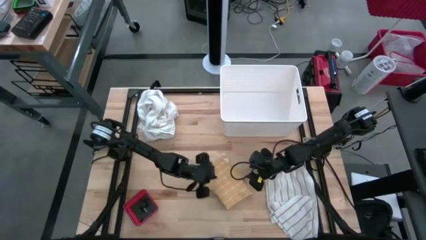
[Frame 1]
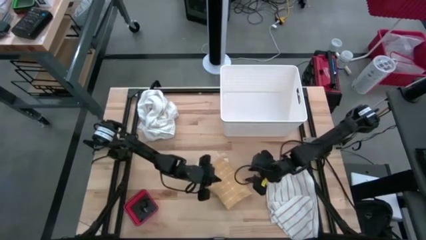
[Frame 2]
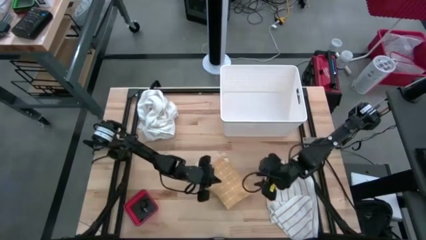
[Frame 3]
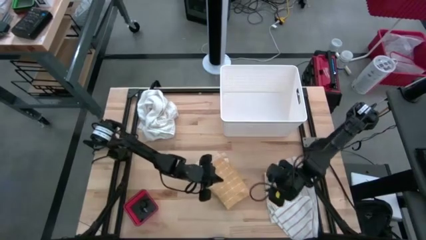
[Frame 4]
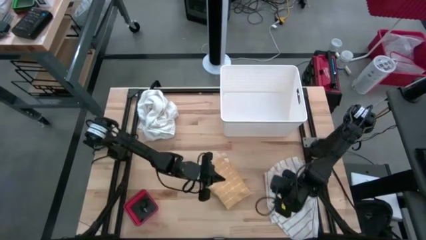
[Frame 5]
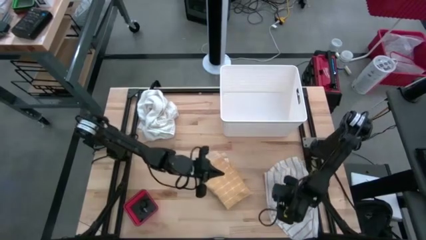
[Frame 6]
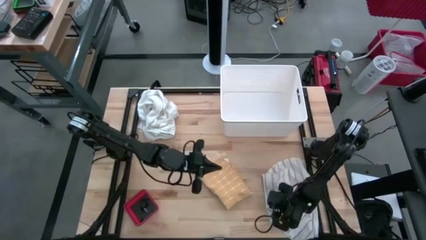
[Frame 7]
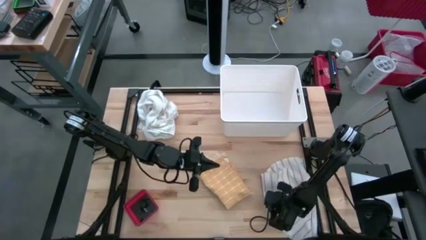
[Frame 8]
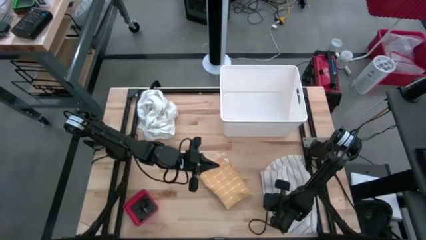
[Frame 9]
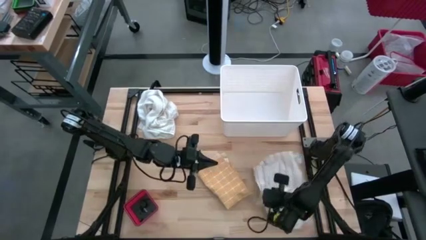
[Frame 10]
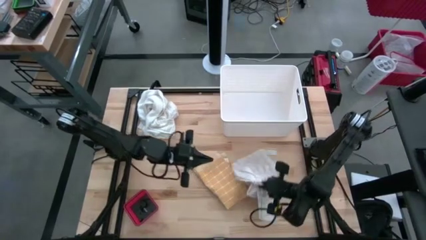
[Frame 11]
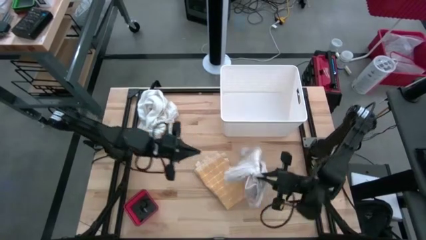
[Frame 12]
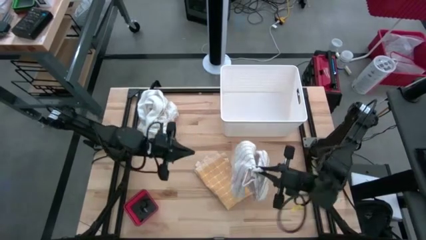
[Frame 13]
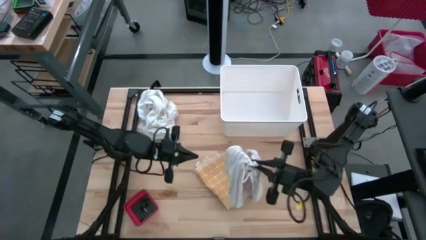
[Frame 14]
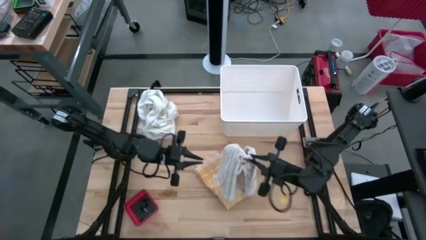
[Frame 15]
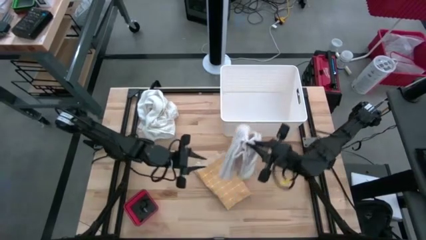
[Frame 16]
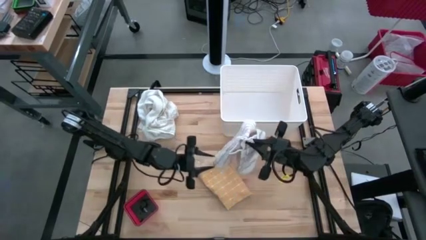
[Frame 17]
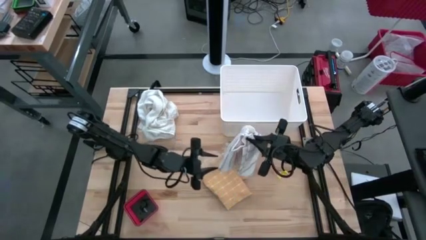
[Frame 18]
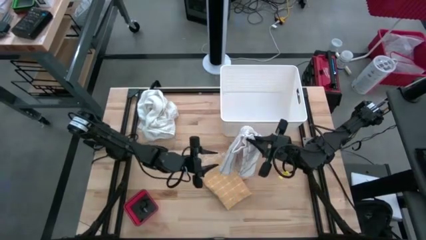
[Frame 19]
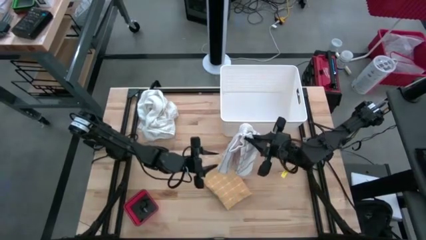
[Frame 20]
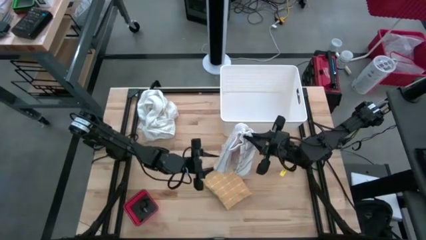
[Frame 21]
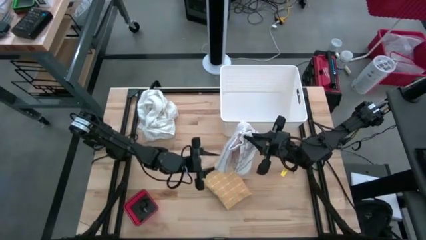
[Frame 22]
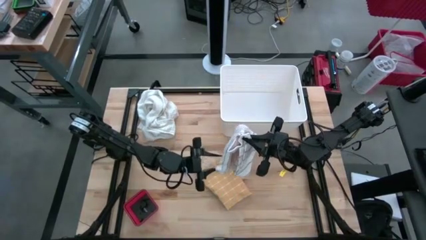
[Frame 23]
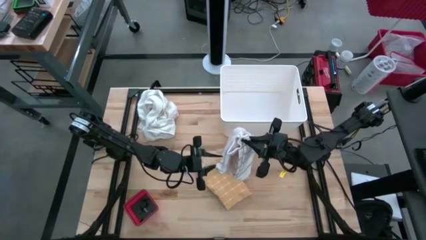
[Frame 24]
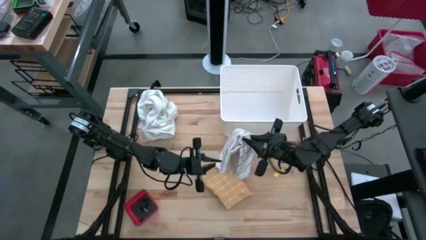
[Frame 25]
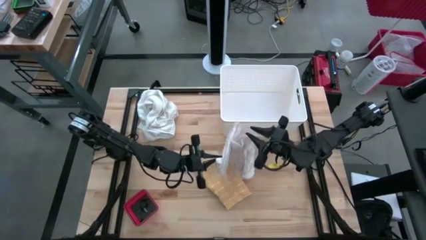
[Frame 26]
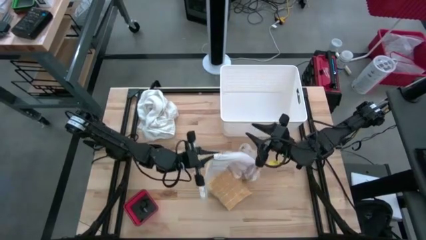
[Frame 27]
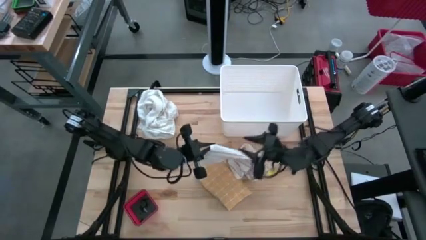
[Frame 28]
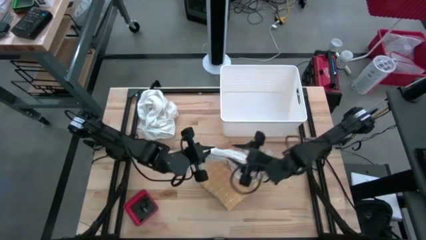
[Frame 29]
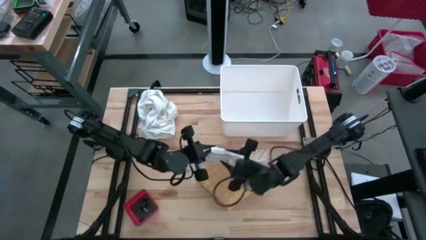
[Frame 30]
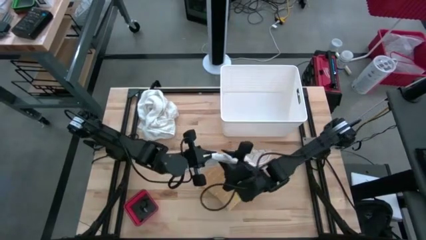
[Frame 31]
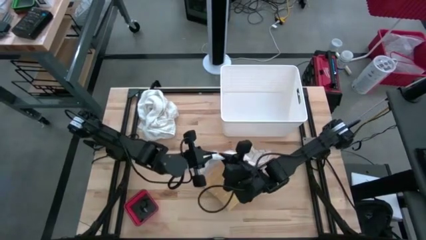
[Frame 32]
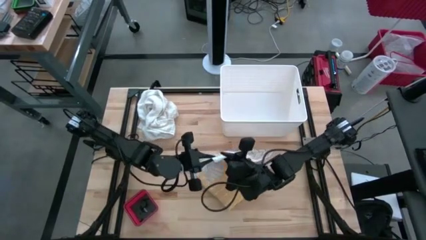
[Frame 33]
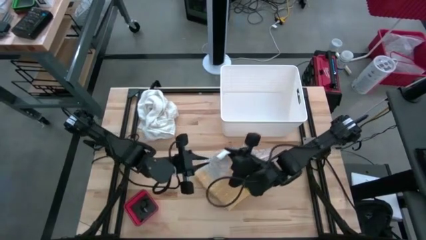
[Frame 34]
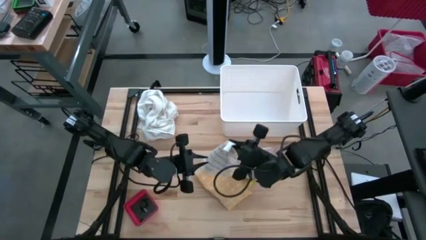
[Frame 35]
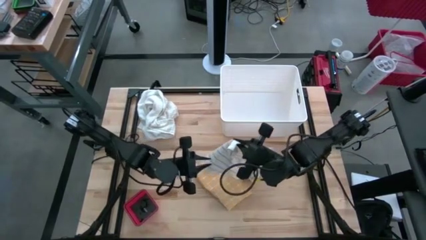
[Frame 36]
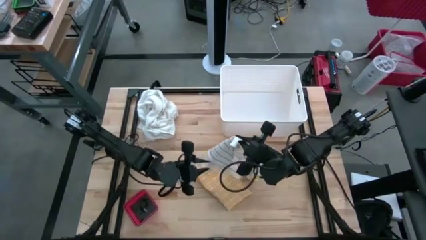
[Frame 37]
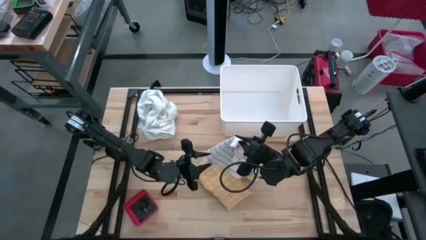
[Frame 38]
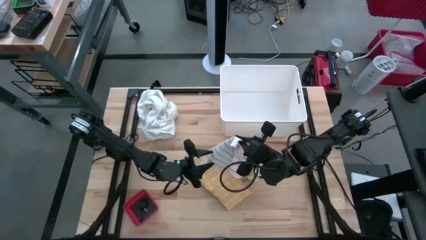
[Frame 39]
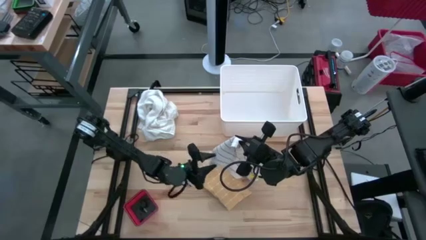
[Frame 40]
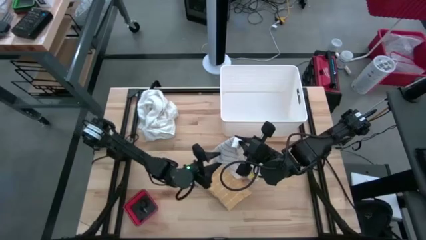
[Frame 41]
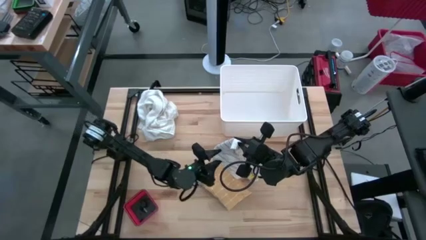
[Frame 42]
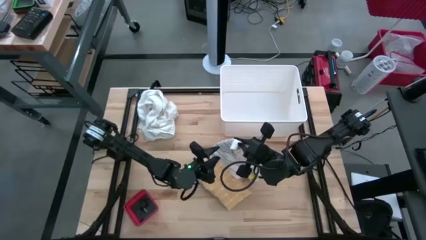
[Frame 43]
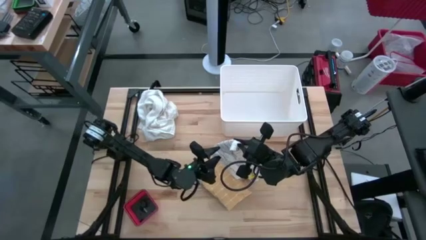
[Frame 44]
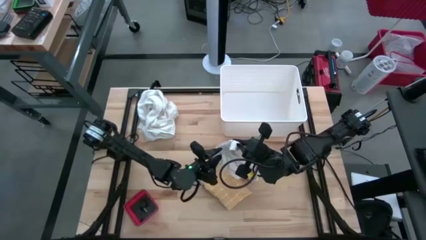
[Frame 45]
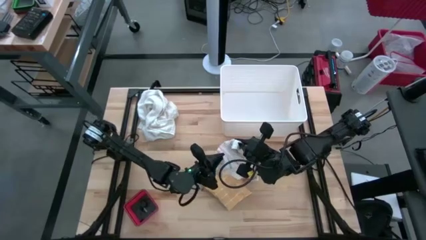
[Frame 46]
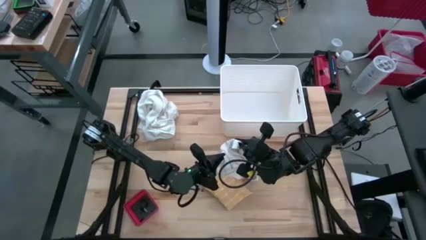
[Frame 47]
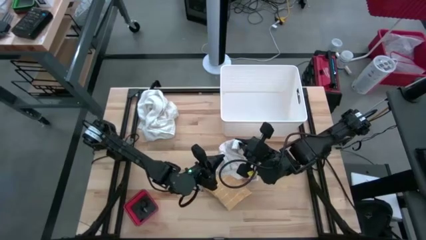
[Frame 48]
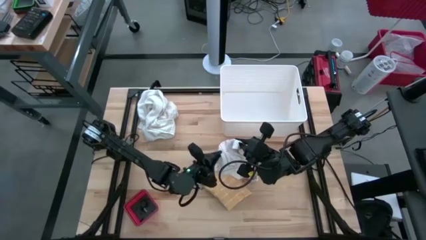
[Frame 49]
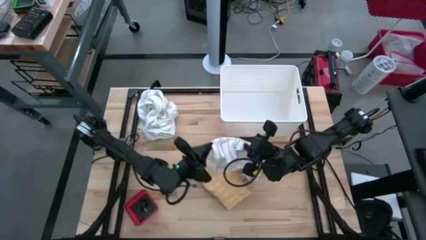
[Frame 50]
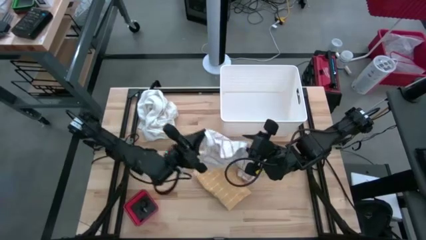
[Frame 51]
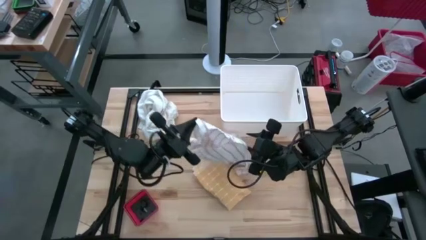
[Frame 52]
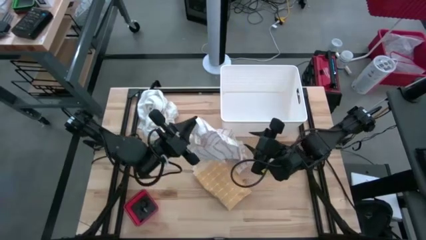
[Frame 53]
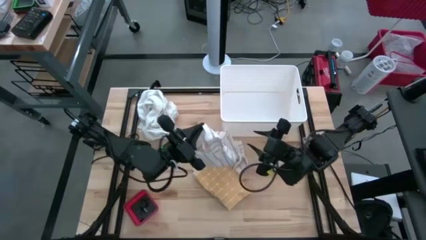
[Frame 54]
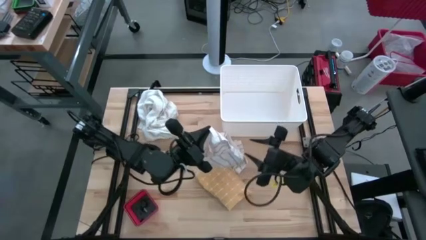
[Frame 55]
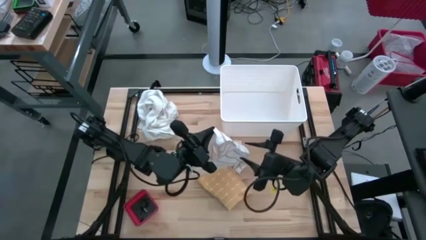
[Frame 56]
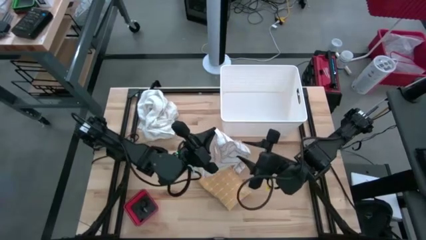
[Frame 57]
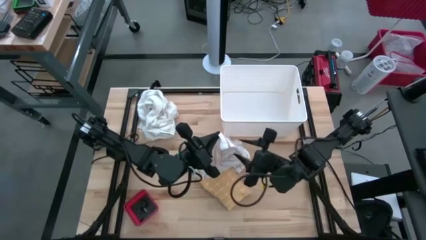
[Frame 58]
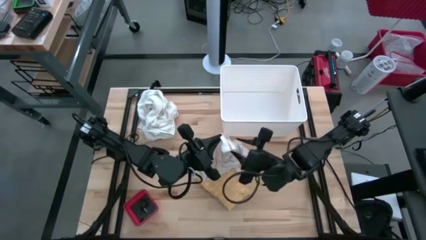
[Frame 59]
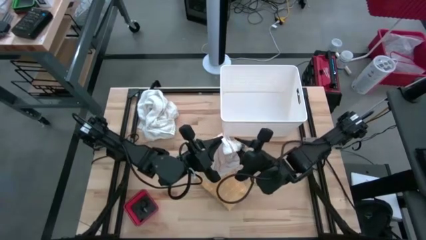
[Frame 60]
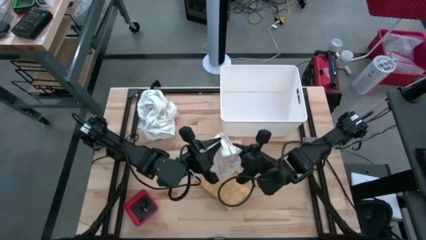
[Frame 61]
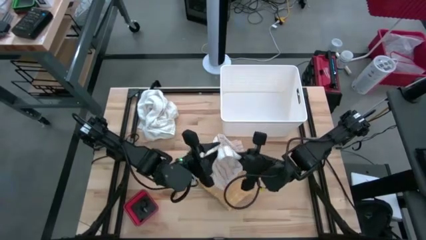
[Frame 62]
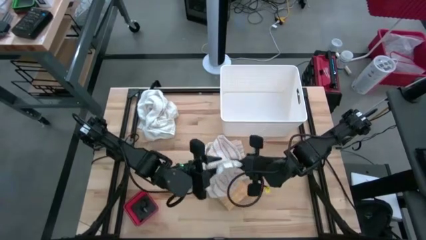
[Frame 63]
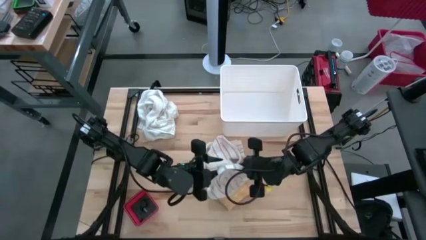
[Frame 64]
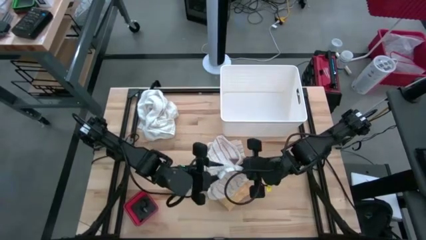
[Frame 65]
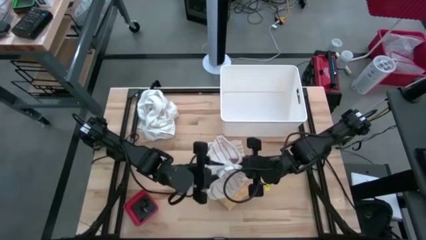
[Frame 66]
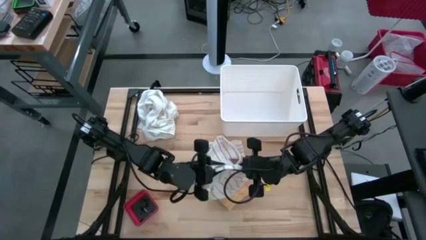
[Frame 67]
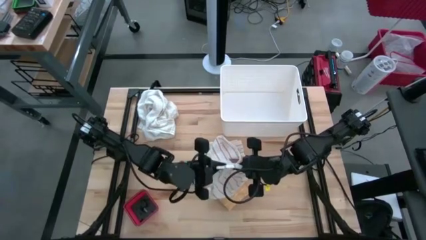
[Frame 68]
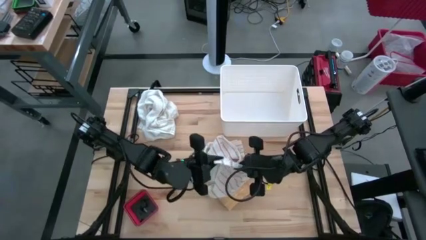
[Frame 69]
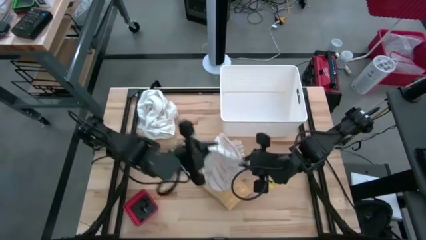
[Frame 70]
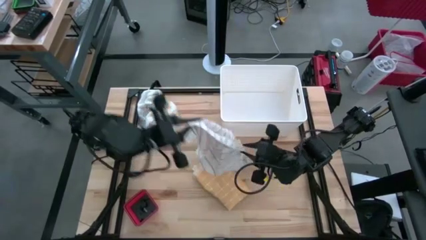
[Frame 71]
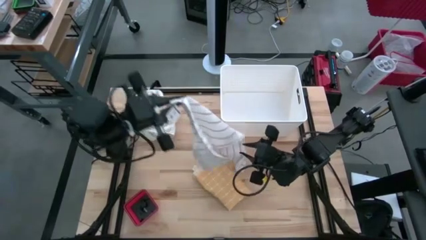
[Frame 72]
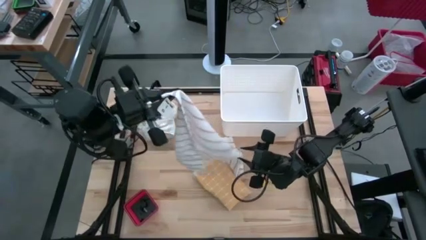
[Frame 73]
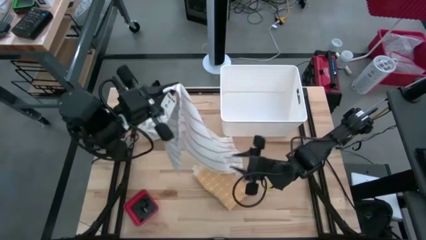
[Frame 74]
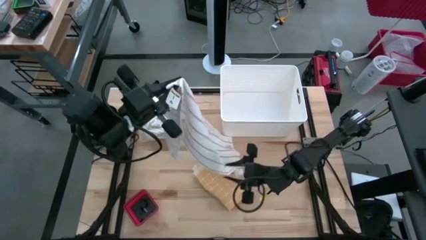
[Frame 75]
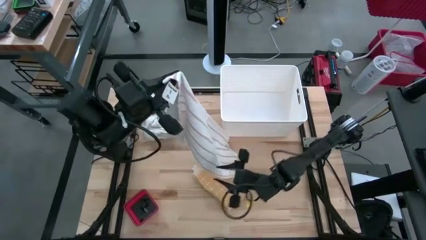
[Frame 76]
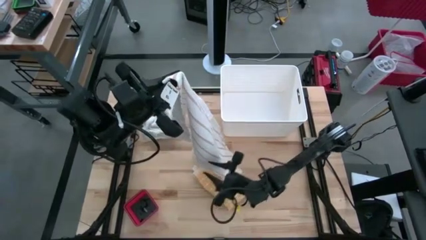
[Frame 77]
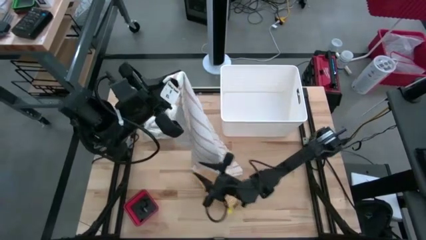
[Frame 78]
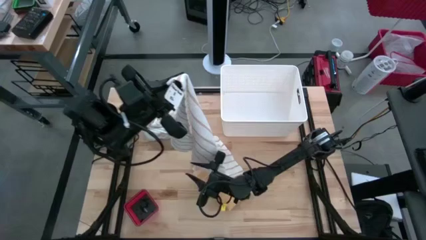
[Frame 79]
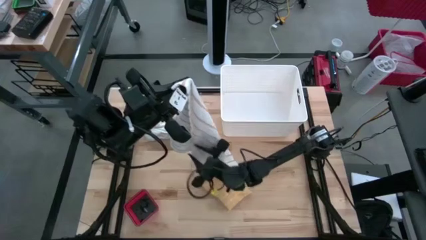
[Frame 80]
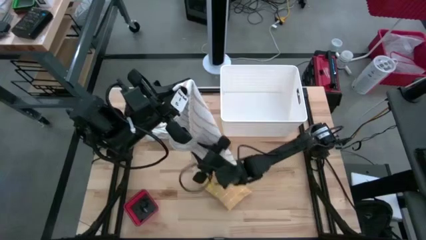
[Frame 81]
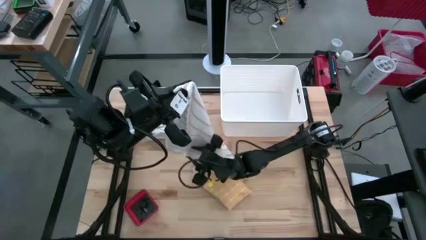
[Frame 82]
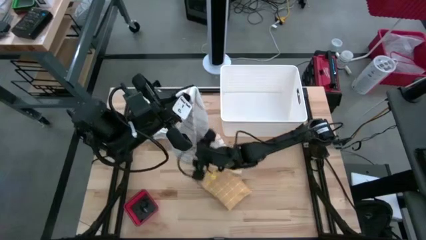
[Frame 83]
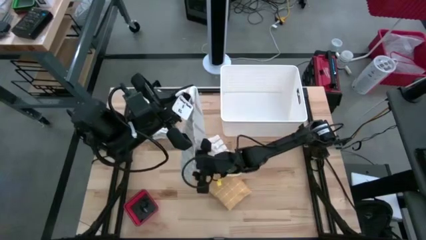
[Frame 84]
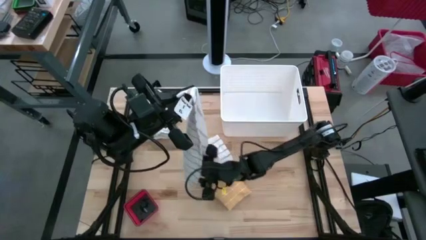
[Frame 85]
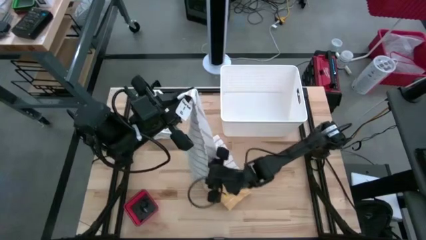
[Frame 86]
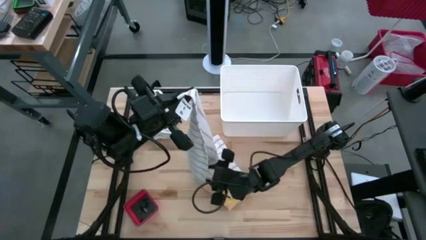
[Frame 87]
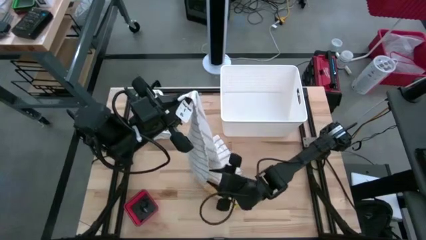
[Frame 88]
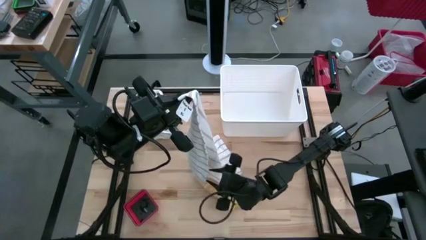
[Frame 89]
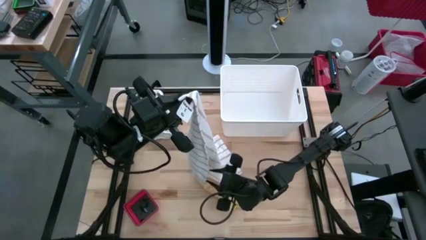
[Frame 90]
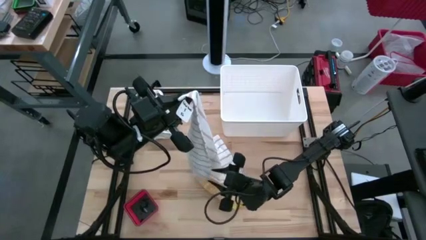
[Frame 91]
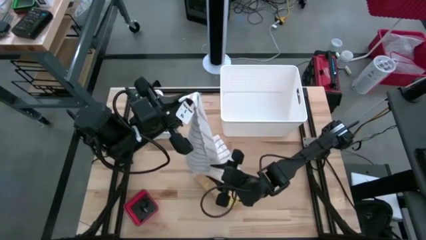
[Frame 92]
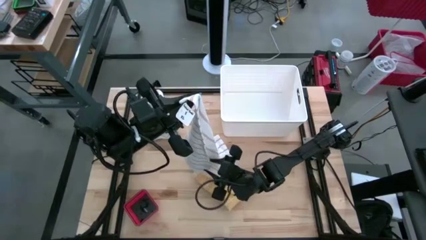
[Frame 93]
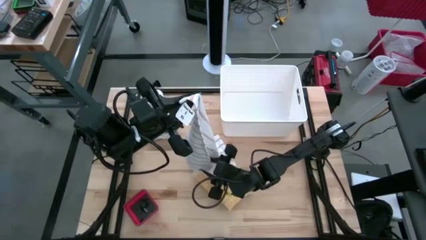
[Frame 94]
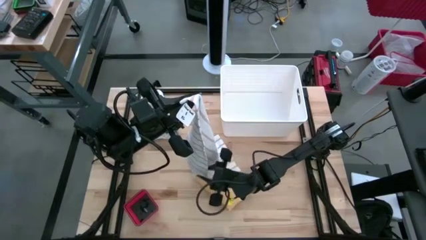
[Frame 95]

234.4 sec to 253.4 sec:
Task: Fold towel
Fold the white kitchen towel
